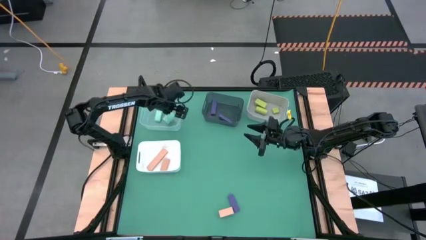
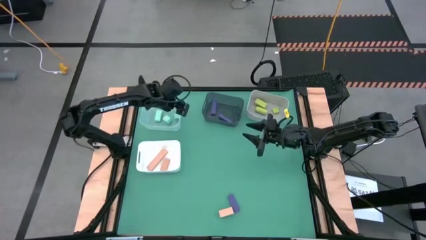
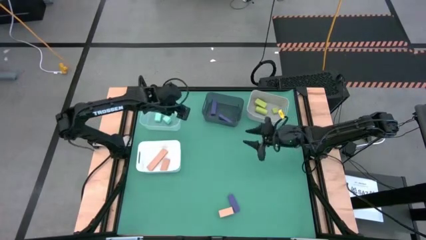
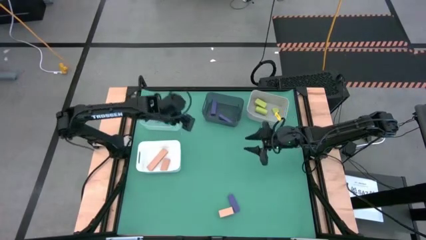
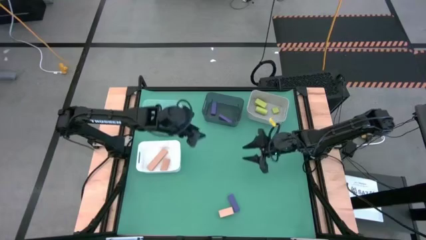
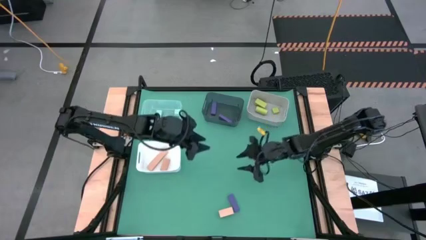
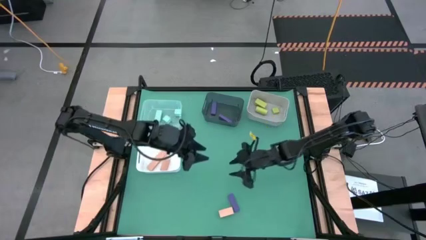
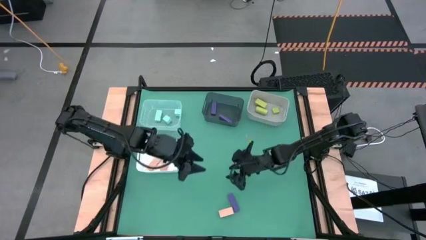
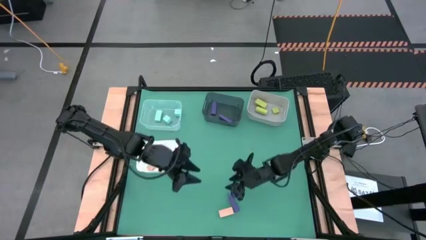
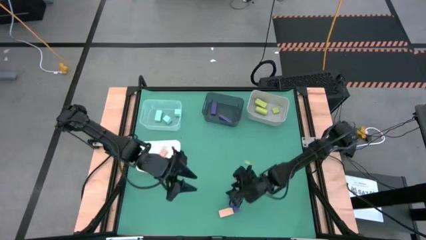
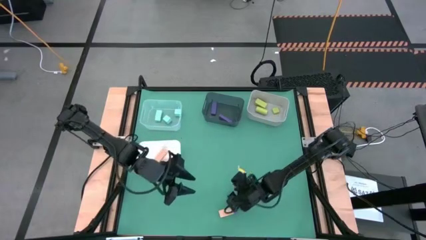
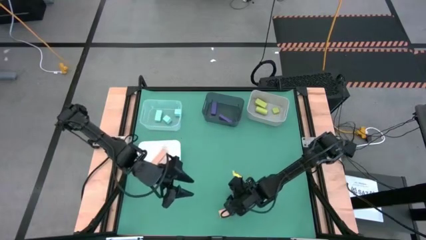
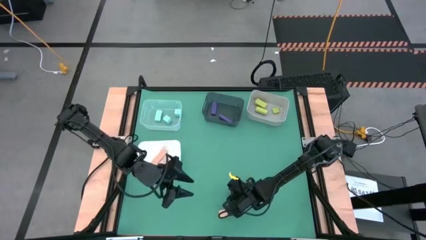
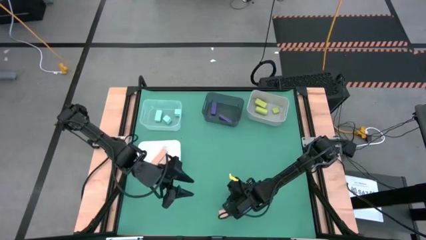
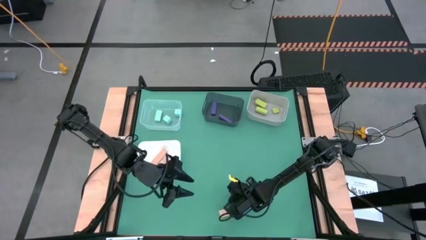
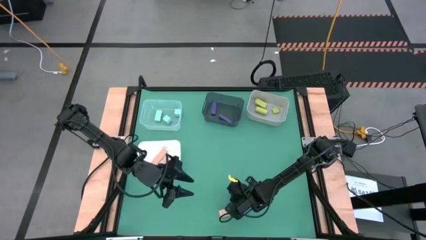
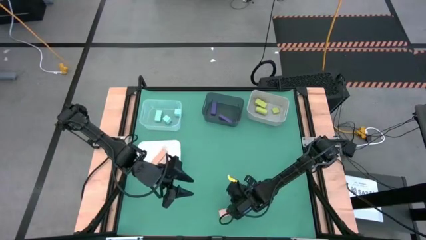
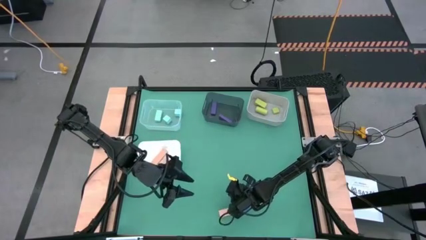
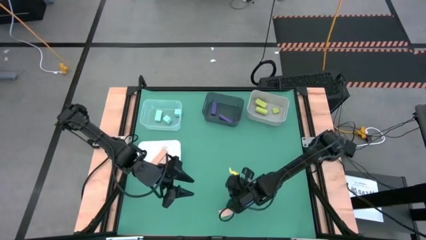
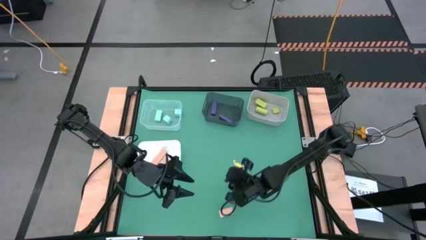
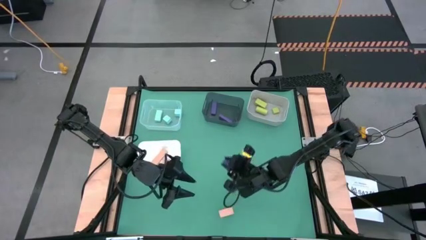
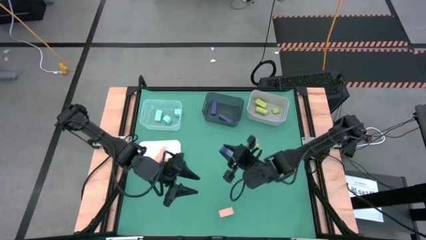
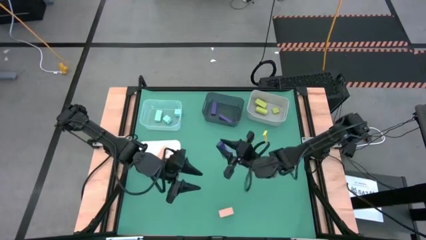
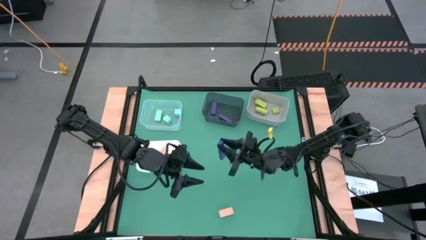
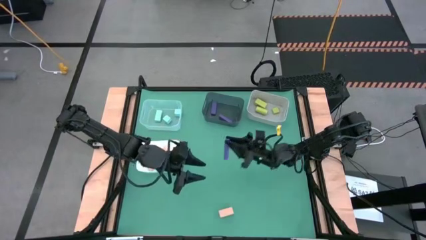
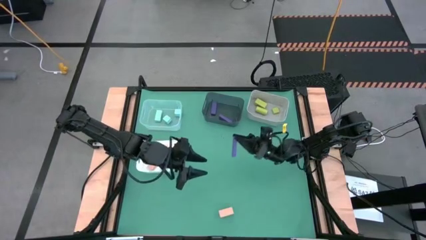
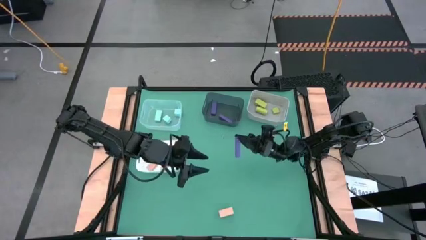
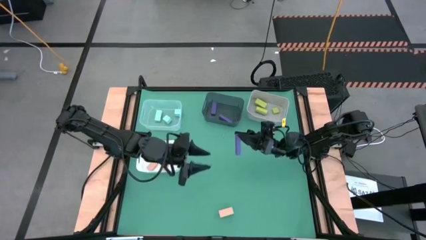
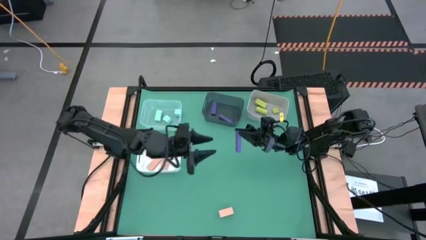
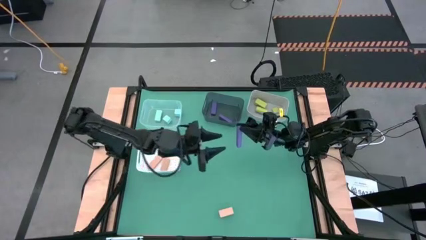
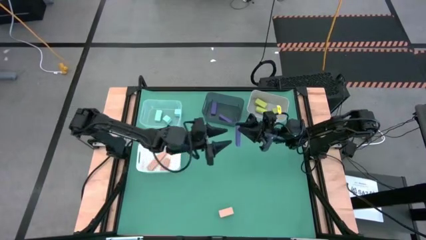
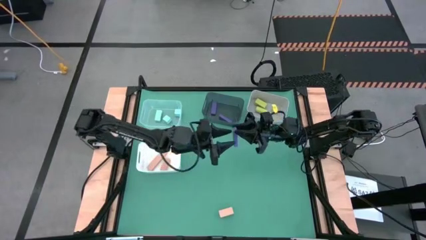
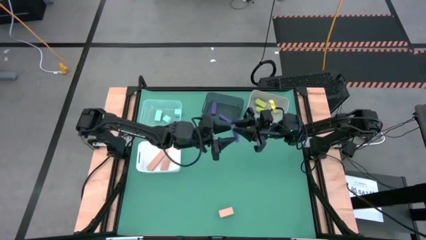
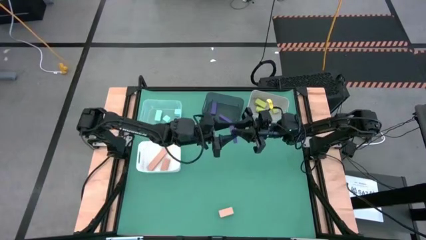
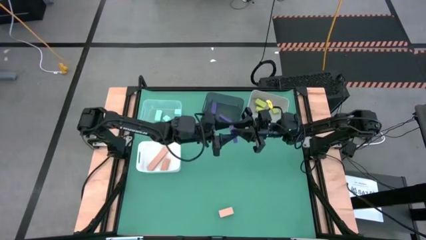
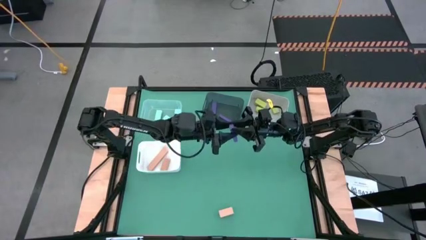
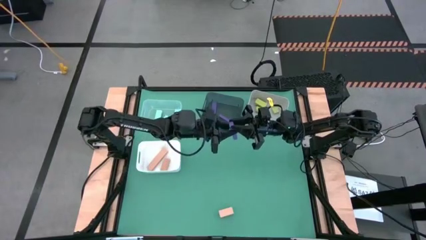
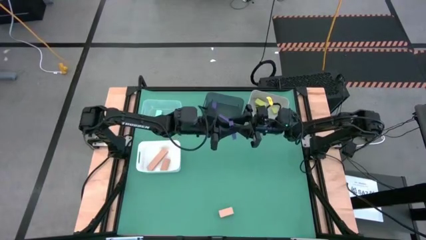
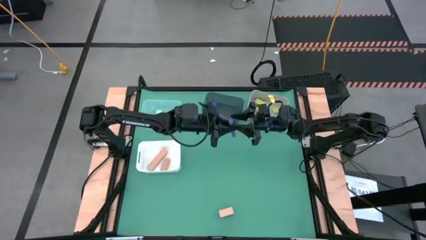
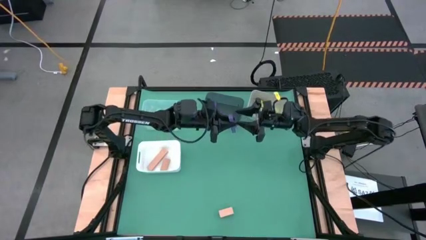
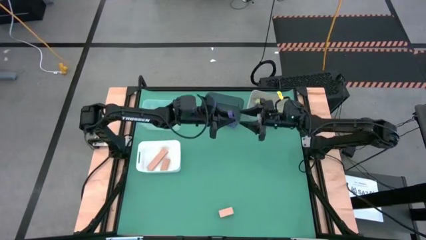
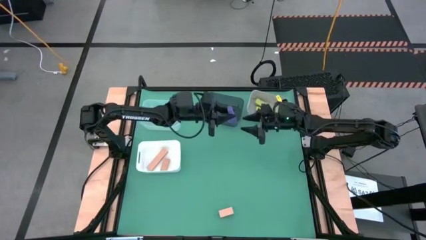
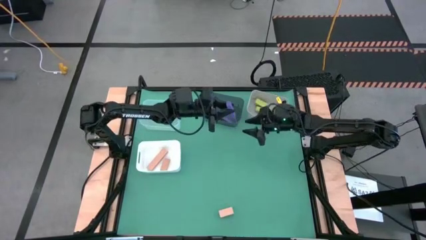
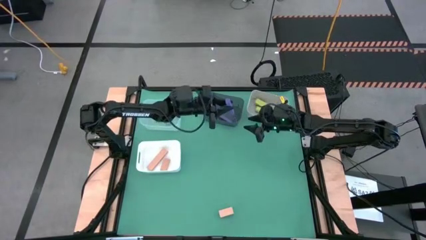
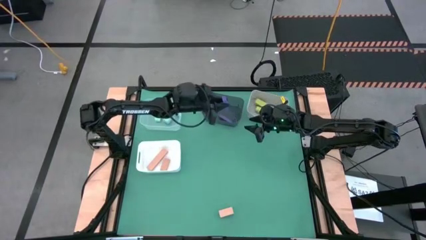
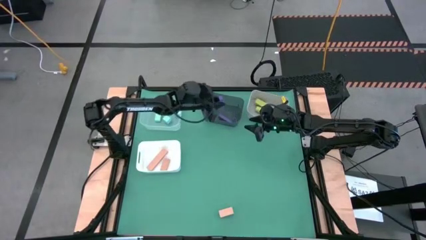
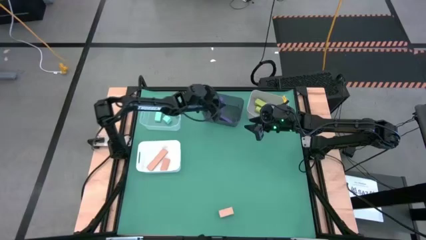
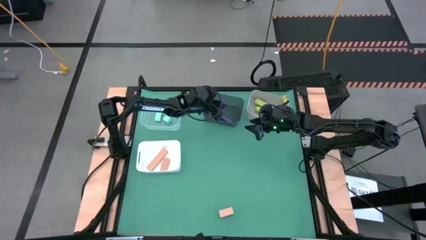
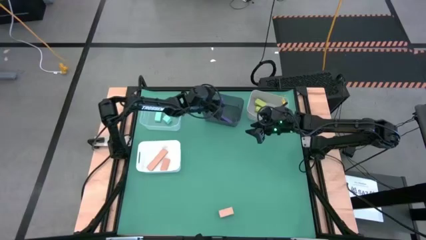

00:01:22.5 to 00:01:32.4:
Task: Sort & place blocks by color
Put the violet block into the black bin

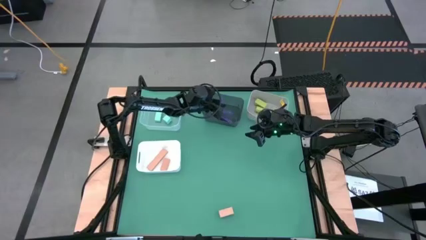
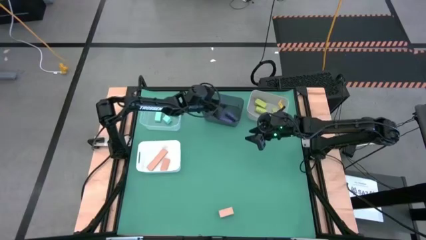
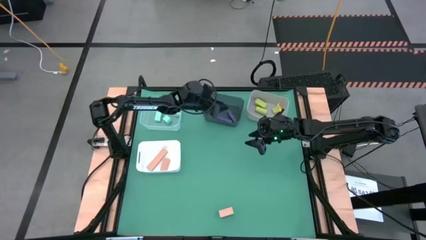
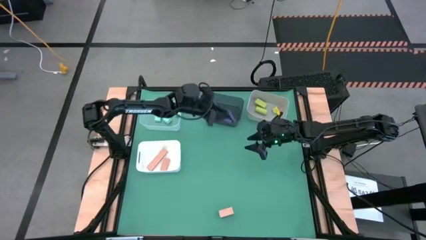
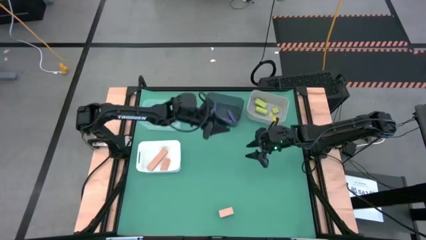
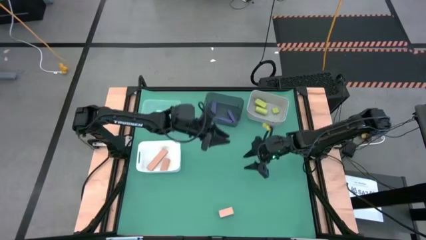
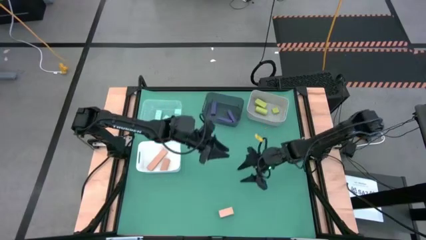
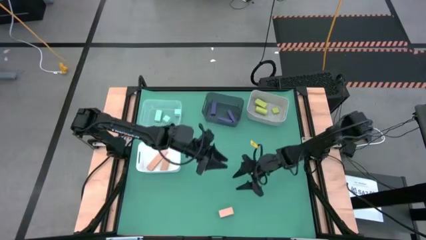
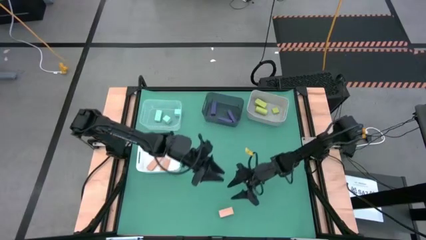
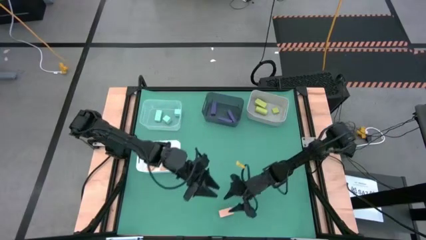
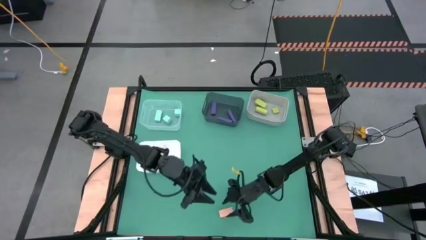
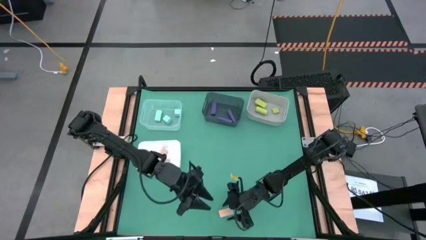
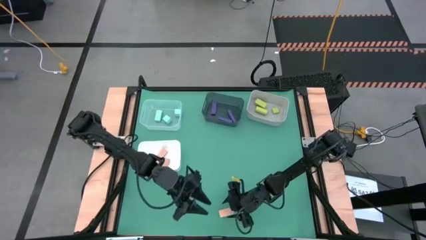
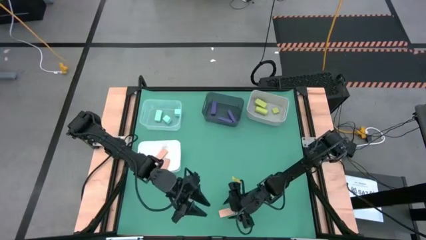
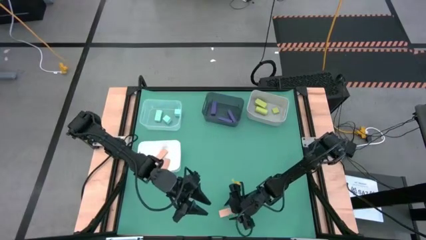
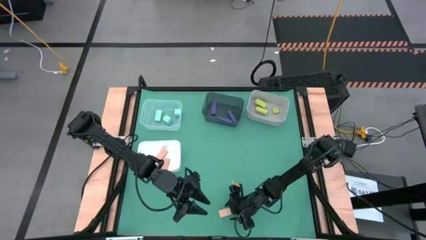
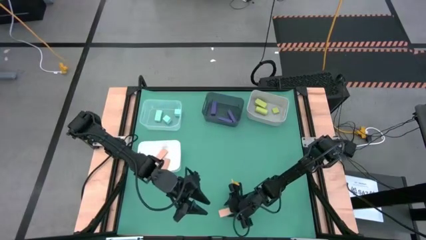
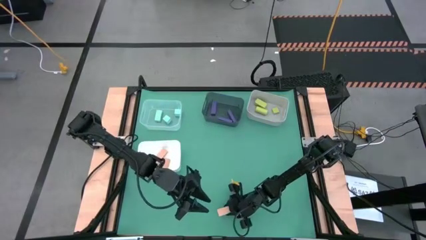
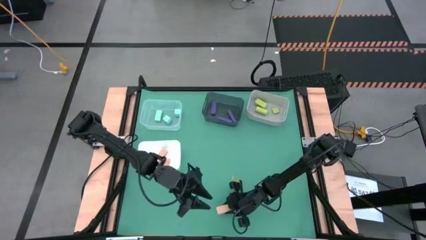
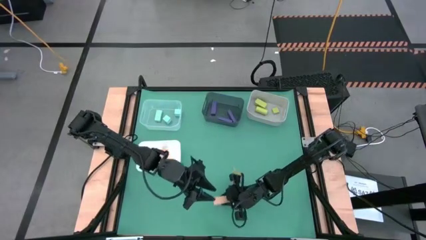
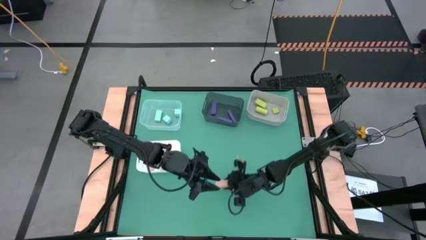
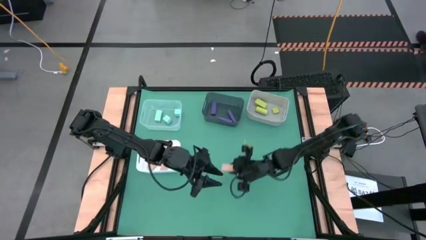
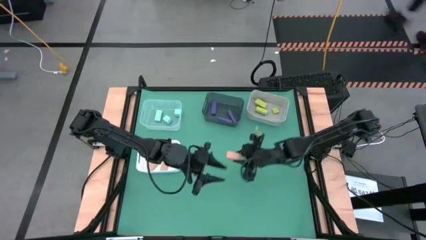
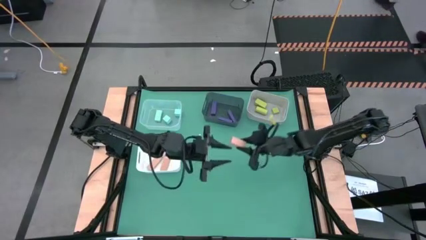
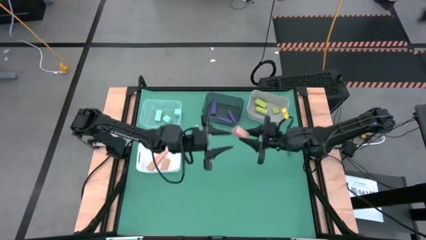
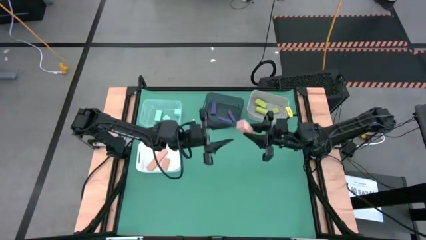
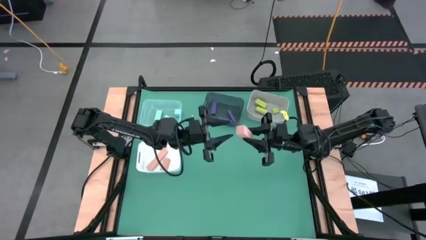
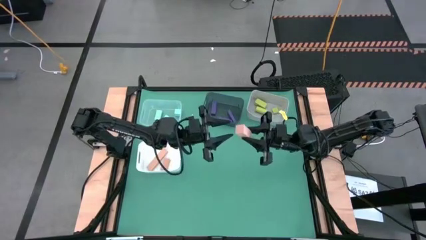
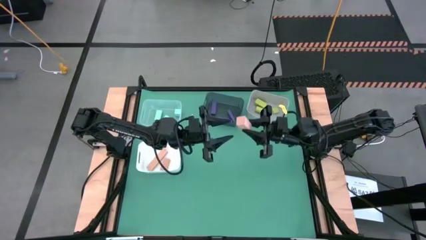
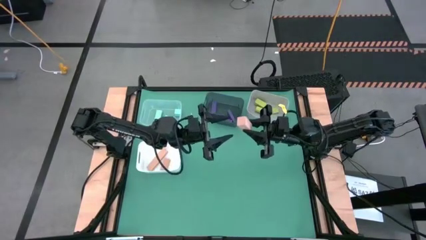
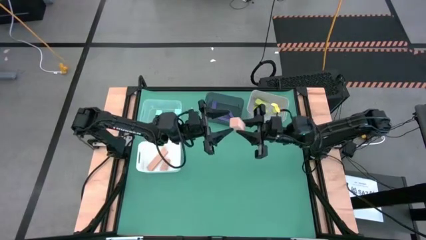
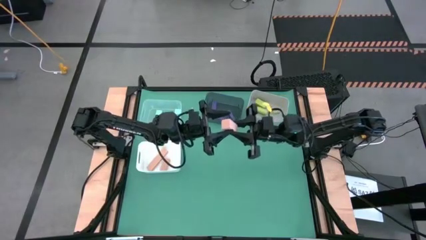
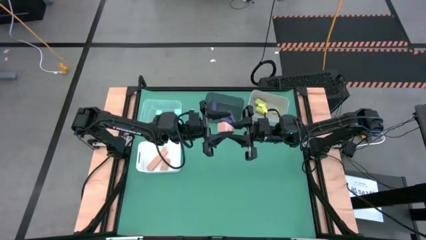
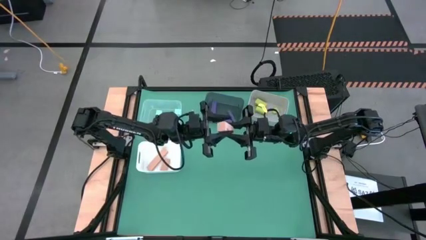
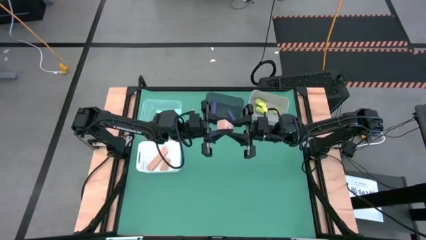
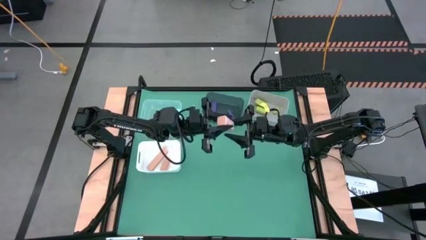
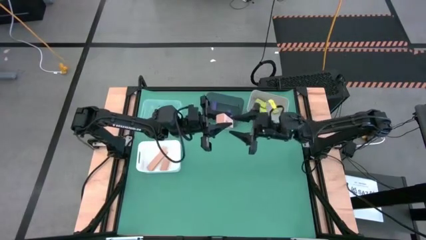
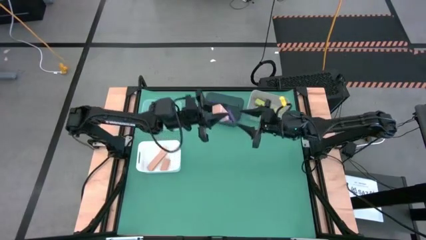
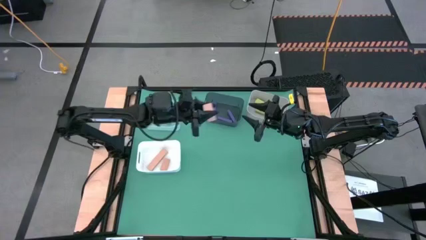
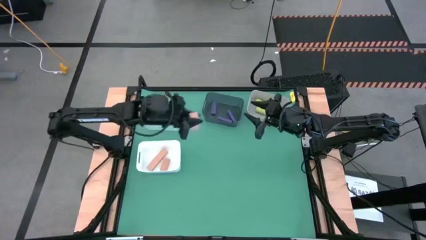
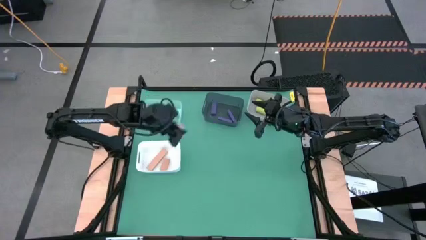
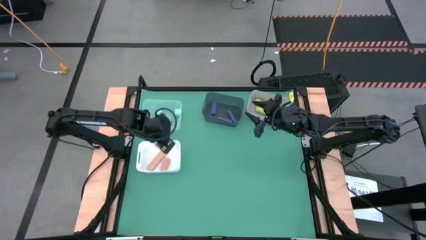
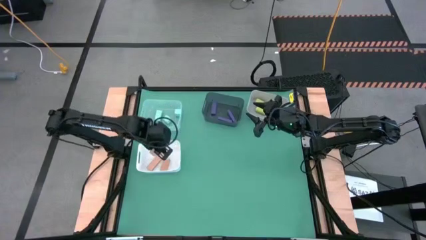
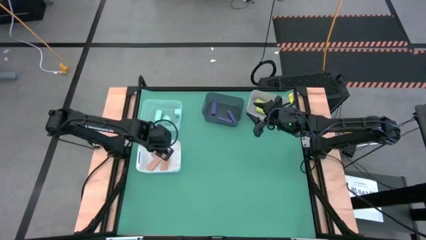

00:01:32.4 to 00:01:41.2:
Put the brown block into the white bin
